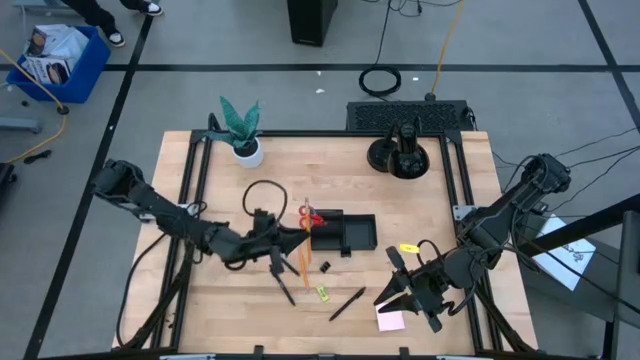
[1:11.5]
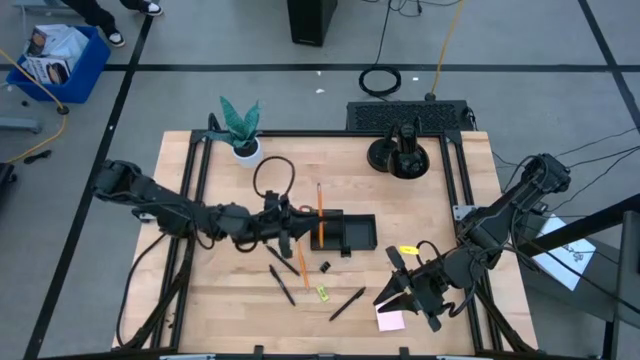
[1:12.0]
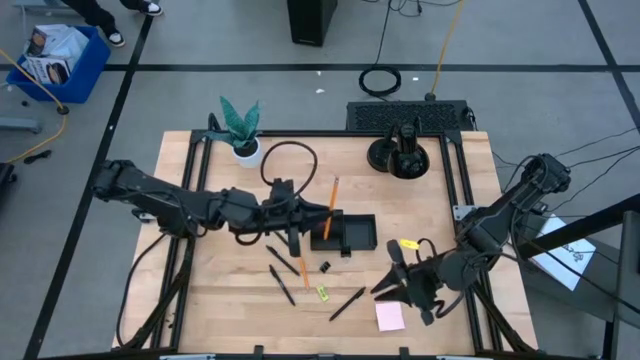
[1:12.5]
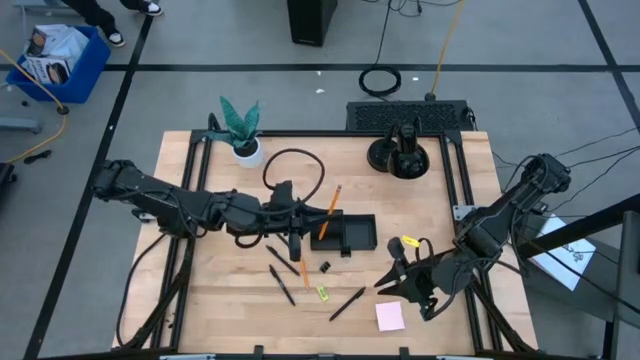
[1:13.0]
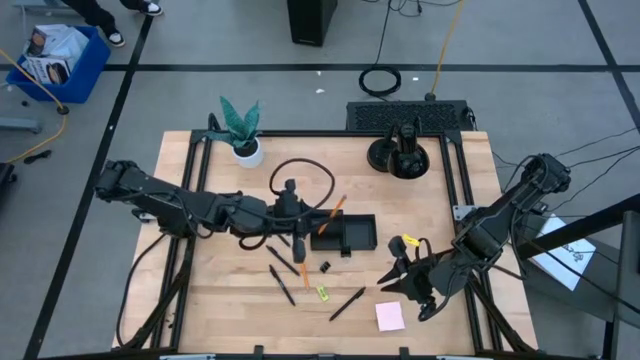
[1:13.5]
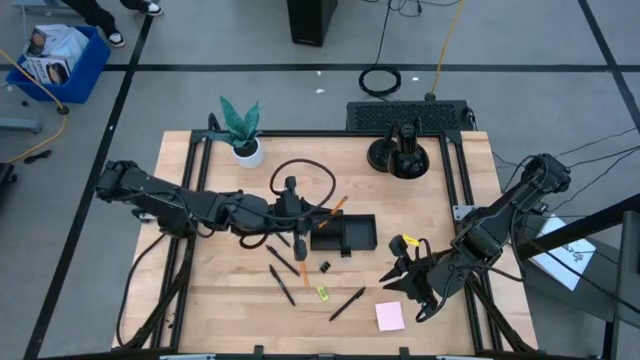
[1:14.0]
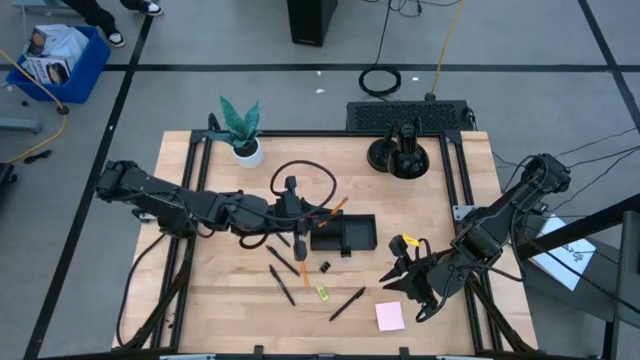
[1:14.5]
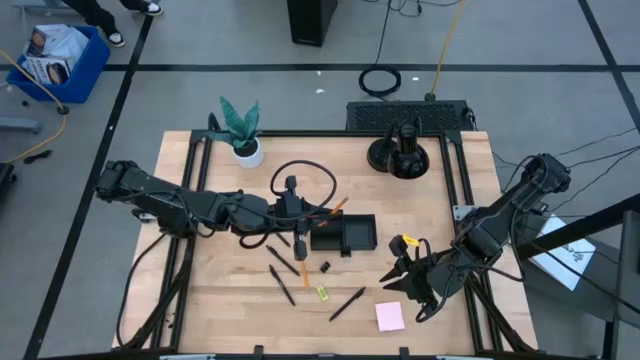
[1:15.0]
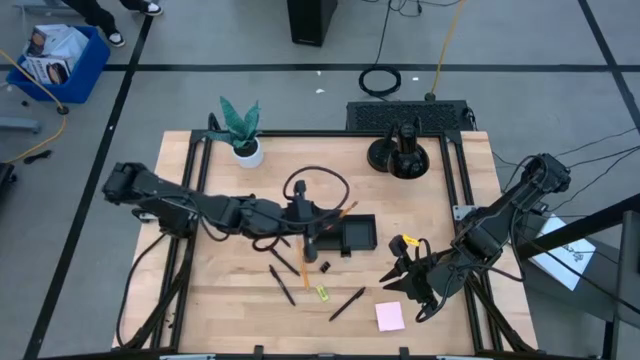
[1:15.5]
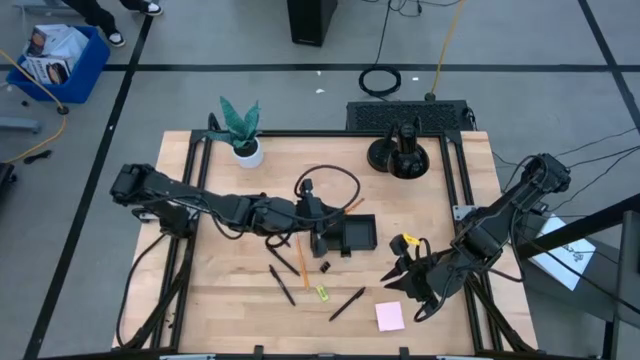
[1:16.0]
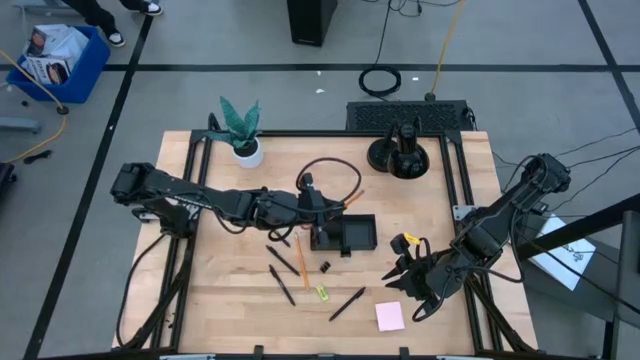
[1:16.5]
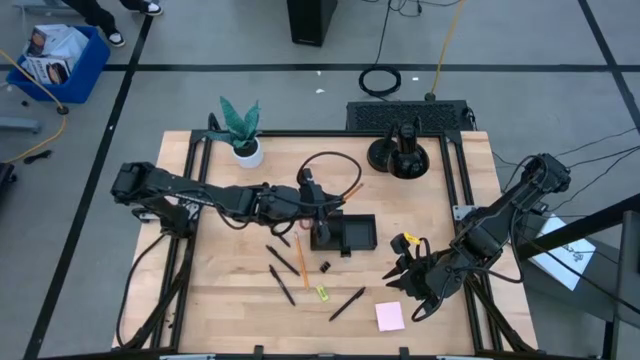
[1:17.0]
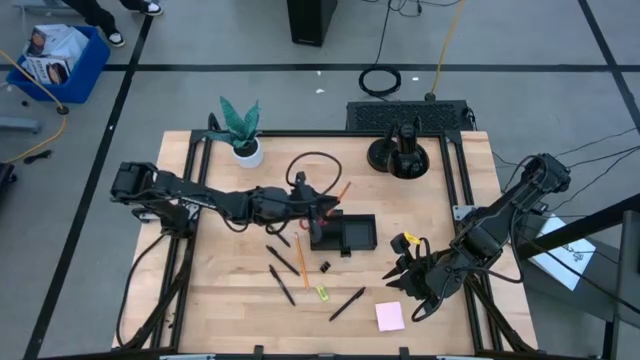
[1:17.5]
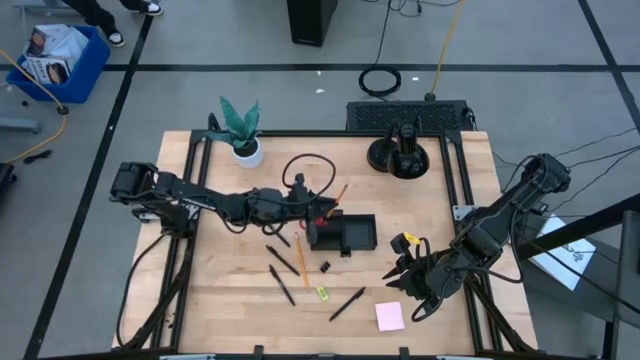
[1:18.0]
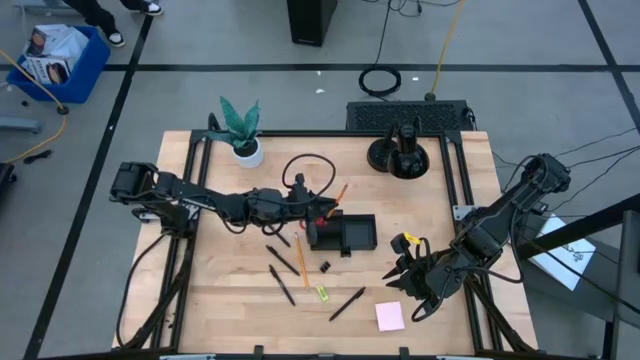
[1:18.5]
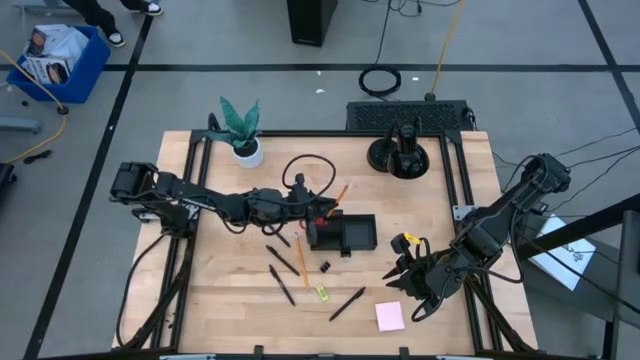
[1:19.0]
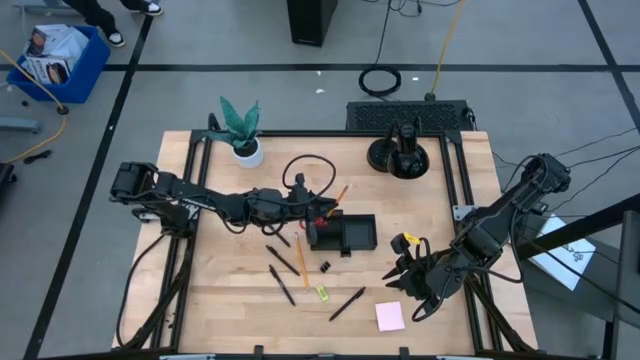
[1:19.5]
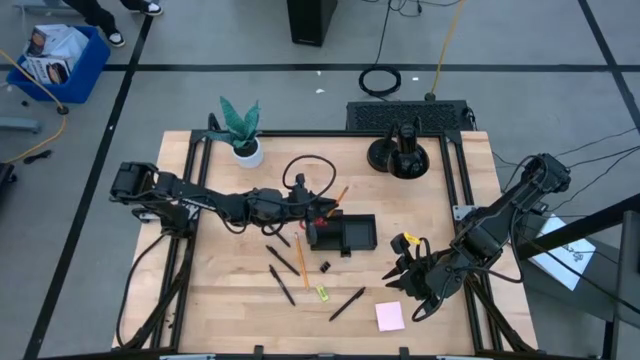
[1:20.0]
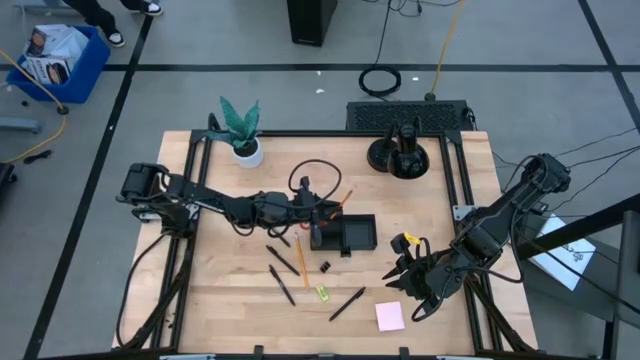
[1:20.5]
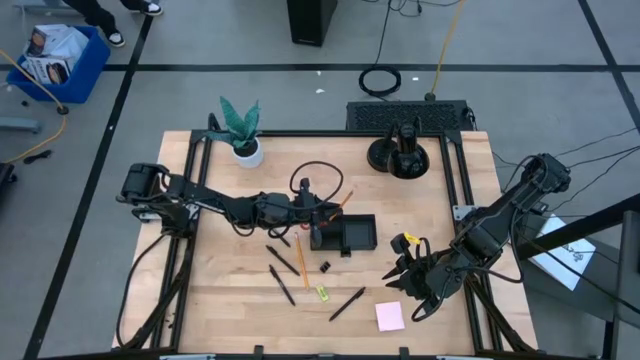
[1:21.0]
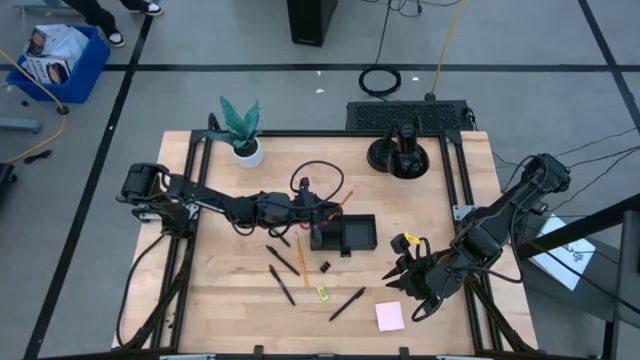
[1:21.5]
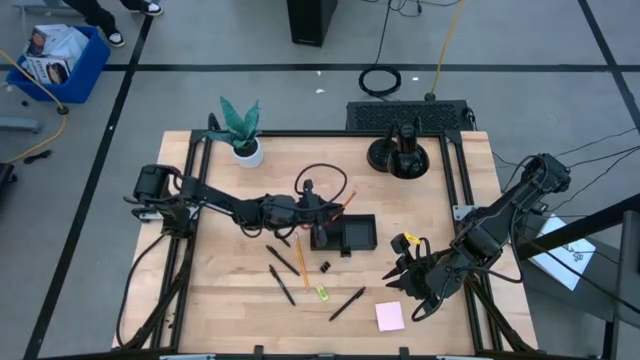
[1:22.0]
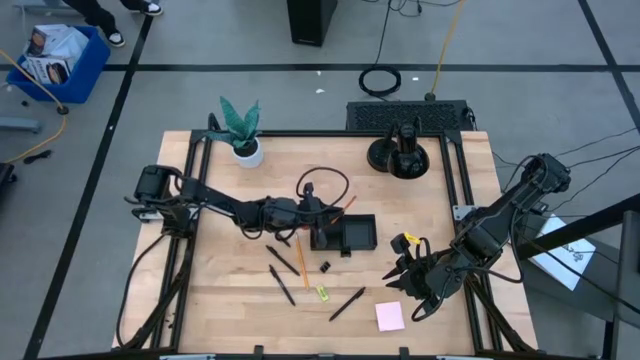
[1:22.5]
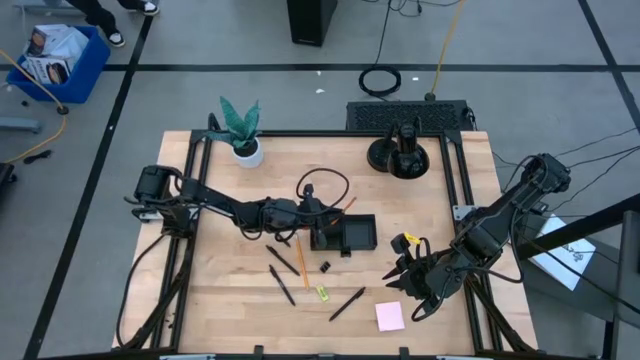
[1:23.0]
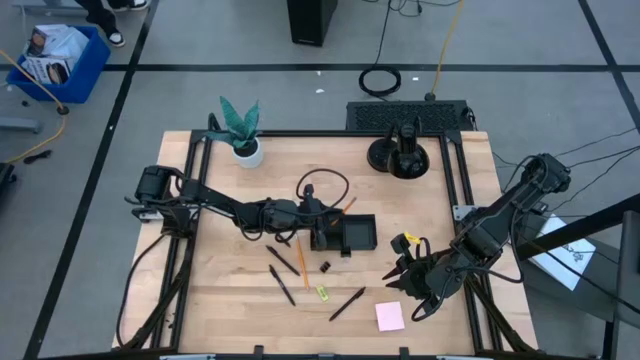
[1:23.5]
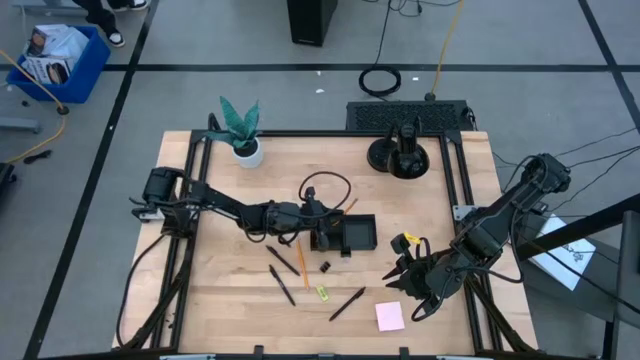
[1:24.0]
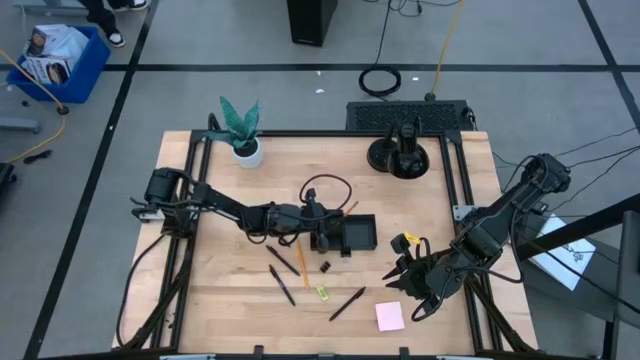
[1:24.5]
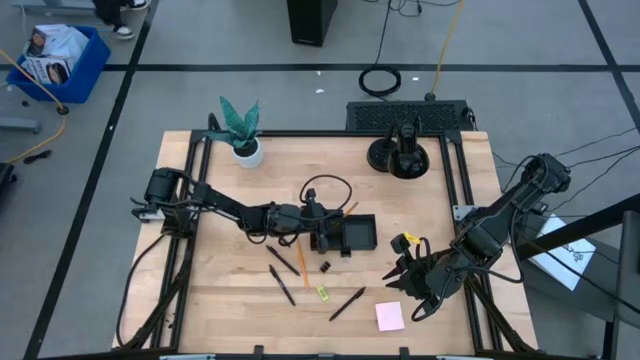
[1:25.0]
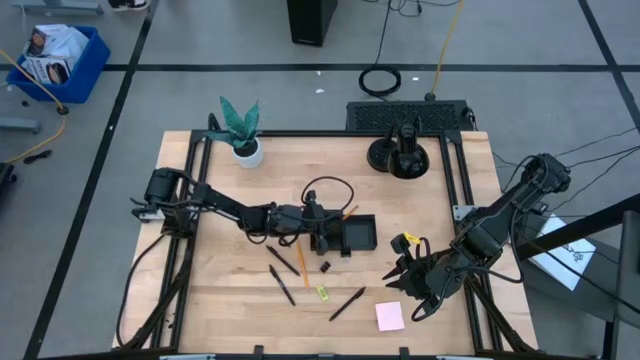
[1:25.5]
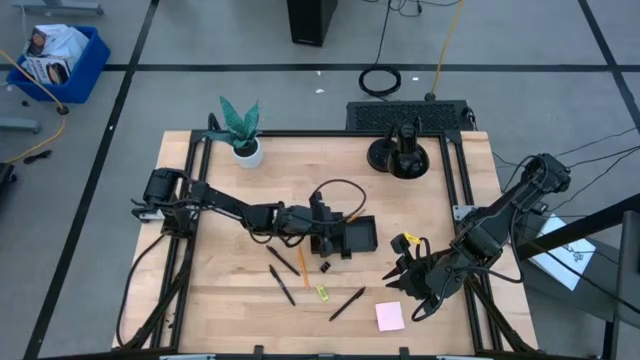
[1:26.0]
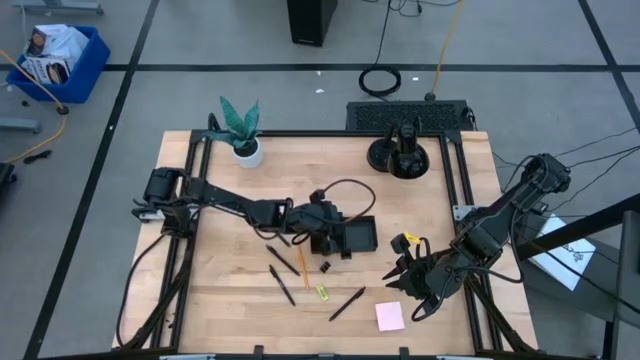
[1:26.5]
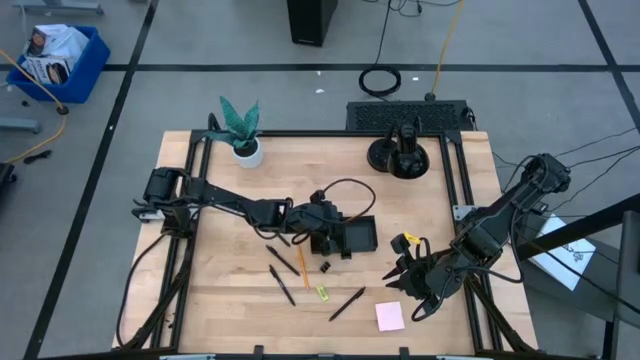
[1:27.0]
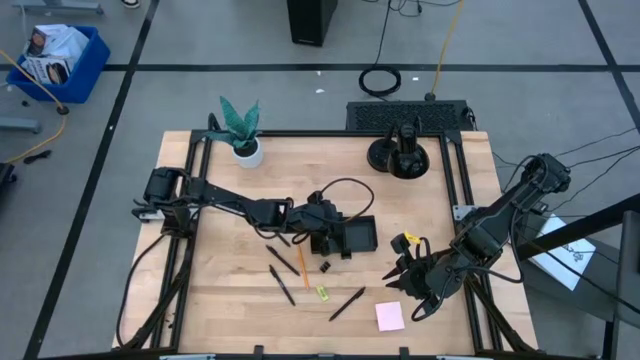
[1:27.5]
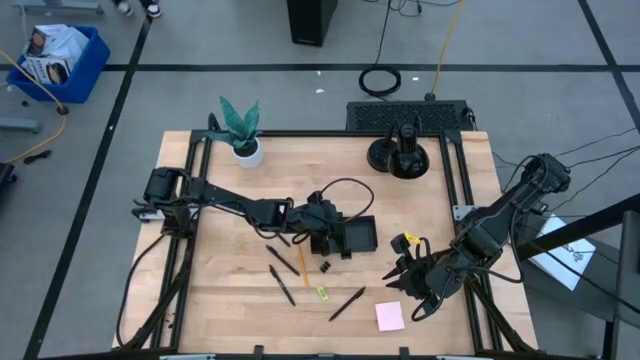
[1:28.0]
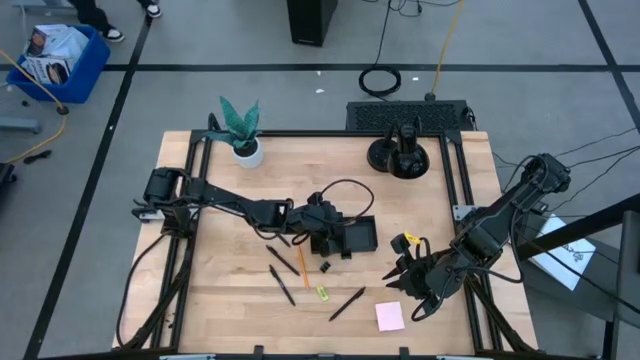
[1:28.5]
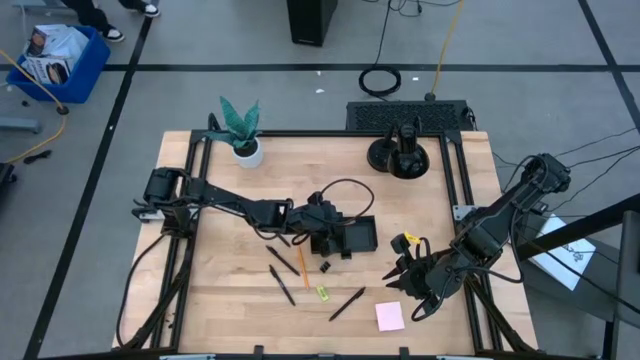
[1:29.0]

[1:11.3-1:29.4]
Task: Pick and place office supplies into organizer
Put the left yellow pencil into the black desk organizer

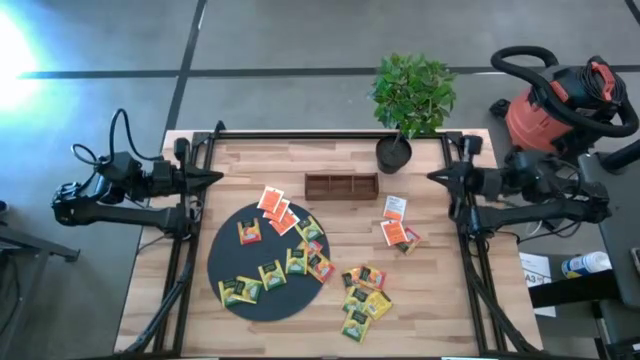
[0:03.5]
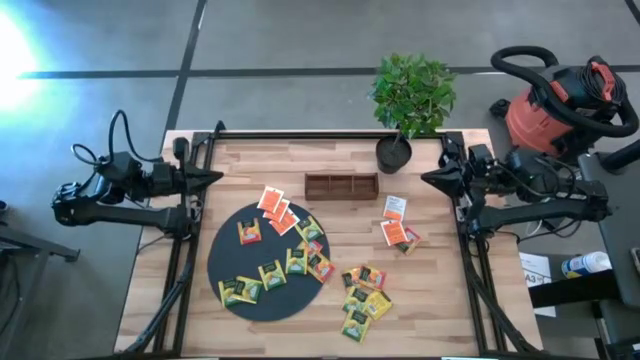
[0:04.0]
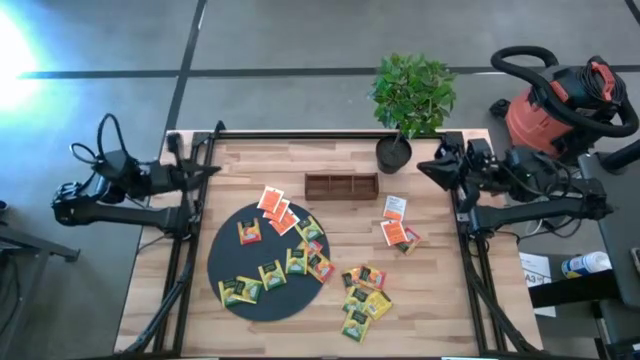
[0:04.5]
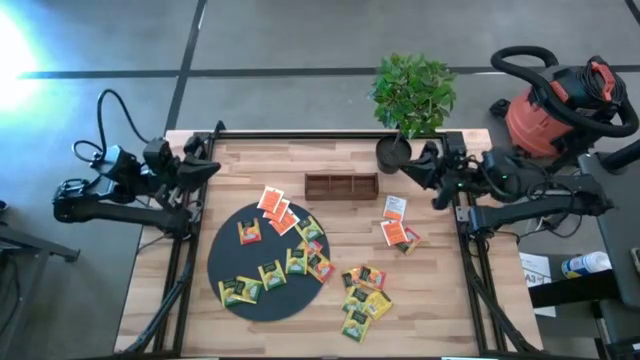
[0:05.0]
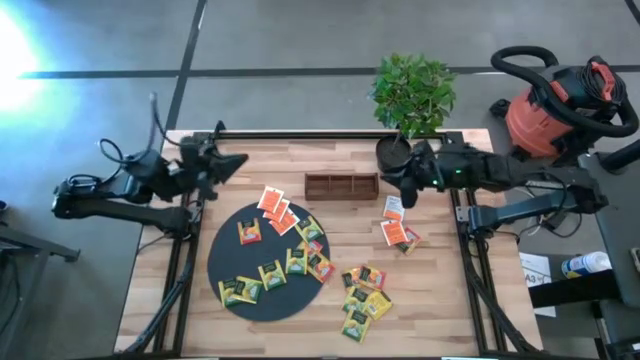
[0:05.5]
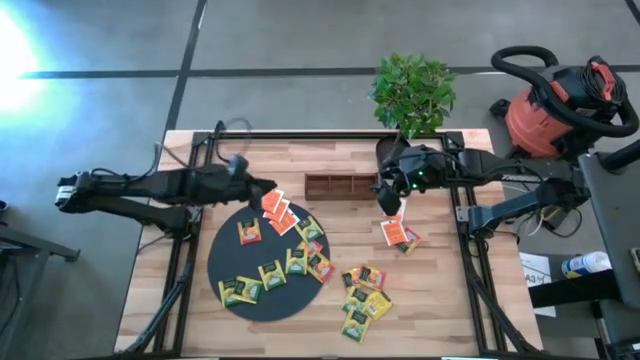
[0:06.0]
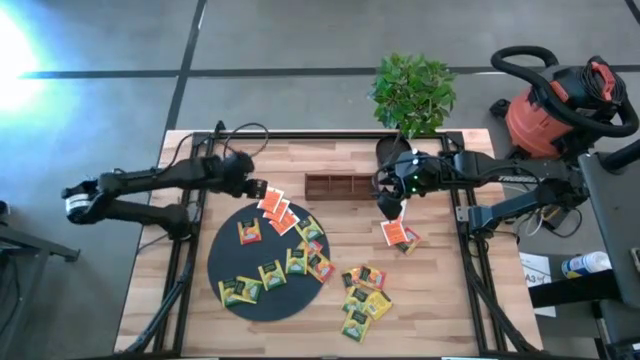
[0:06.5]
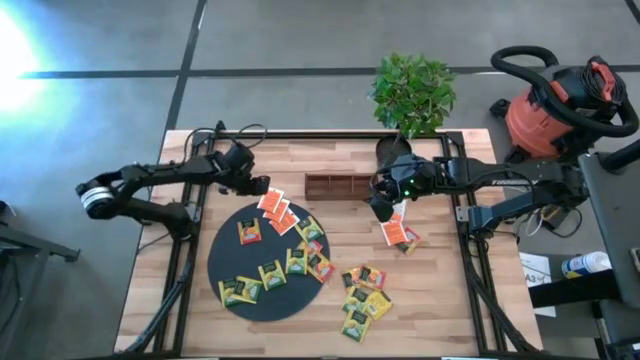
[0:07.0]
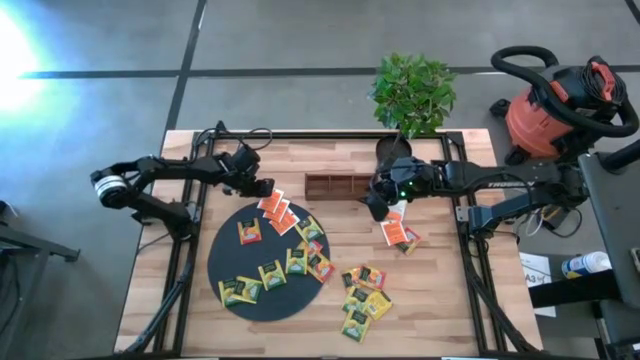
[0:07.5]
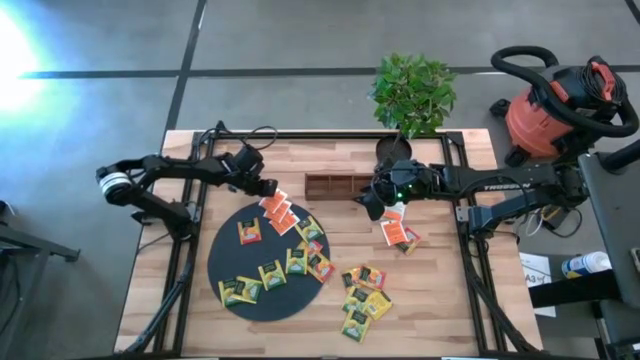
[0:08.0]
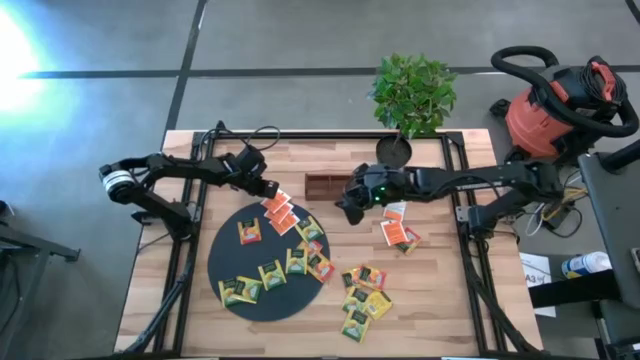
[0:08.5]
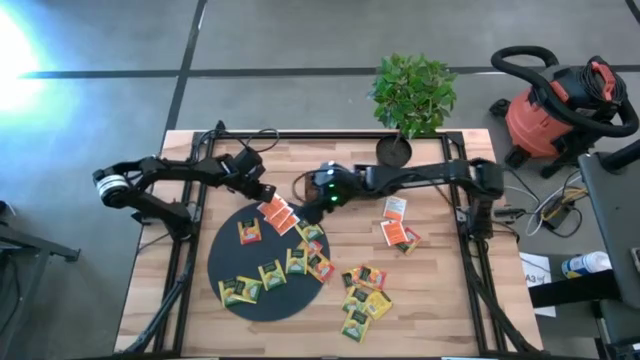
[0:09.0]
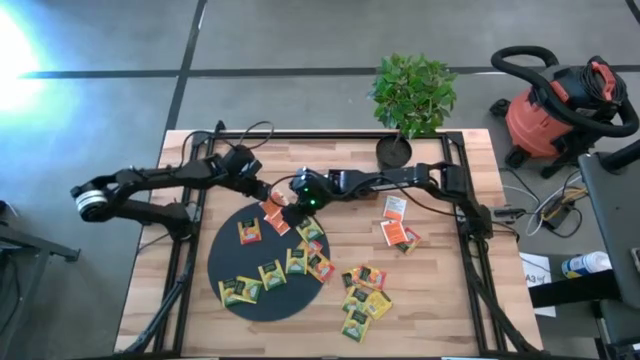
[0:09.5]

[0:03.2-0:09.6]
Task: Pick & Place Tea
Put the white tea bag into the left section of the brown wooden organizer
